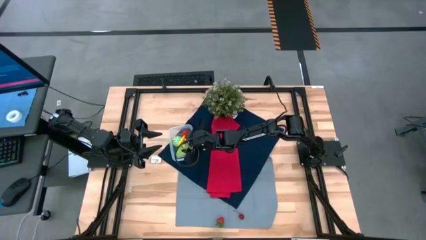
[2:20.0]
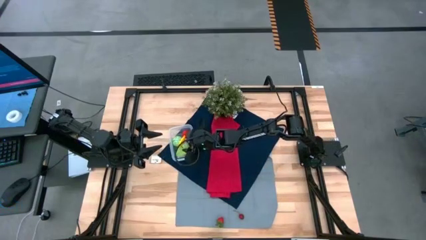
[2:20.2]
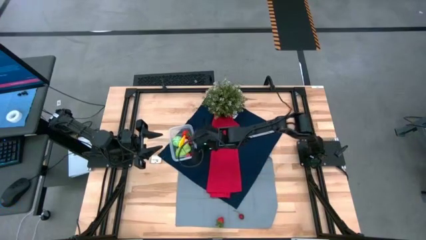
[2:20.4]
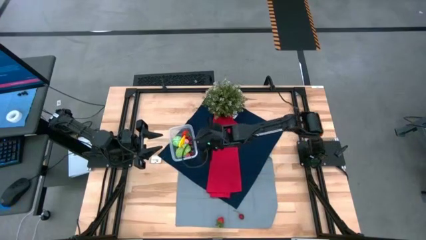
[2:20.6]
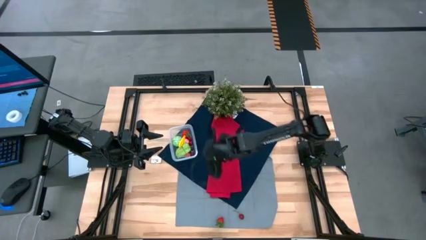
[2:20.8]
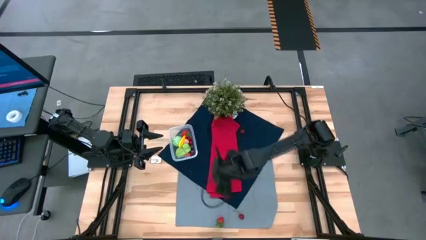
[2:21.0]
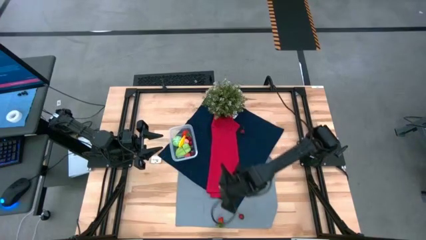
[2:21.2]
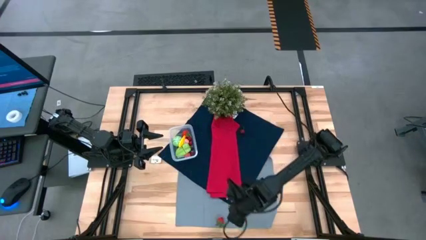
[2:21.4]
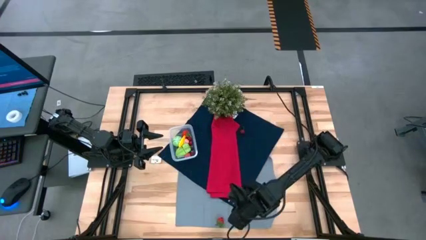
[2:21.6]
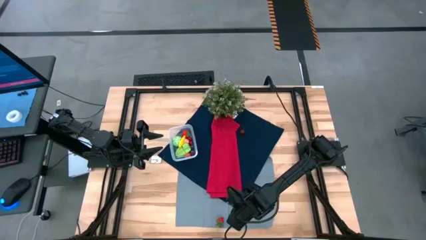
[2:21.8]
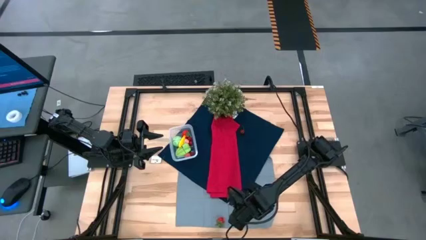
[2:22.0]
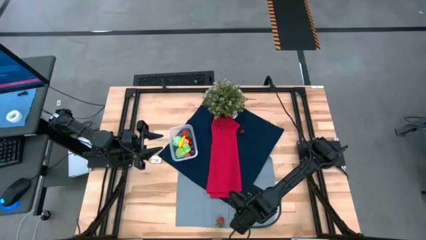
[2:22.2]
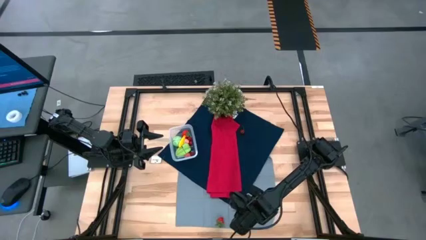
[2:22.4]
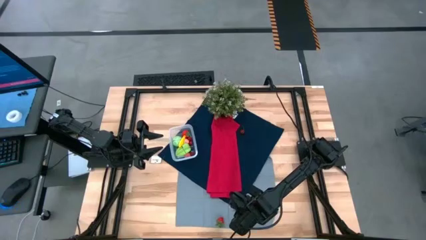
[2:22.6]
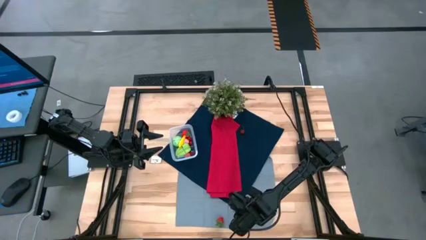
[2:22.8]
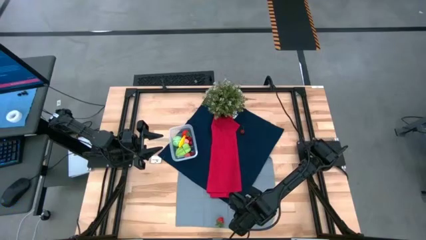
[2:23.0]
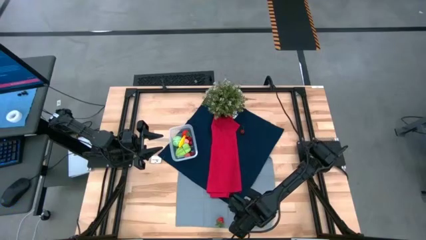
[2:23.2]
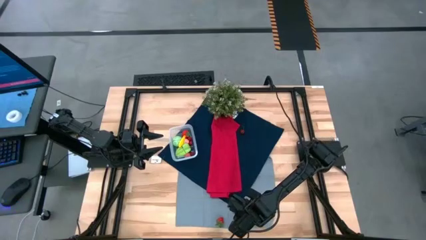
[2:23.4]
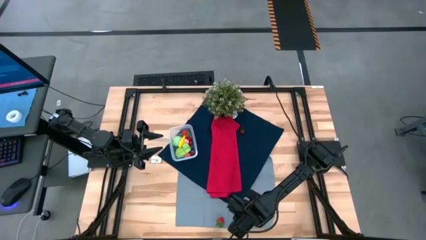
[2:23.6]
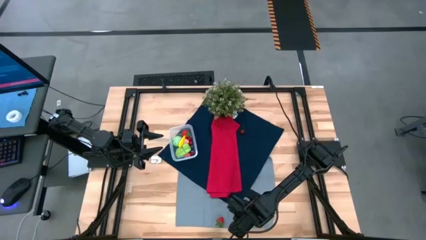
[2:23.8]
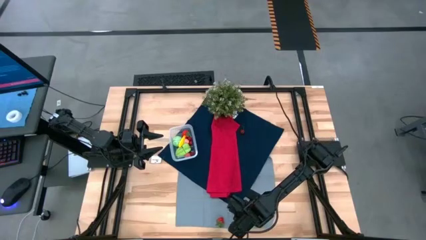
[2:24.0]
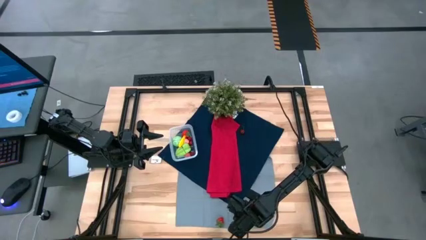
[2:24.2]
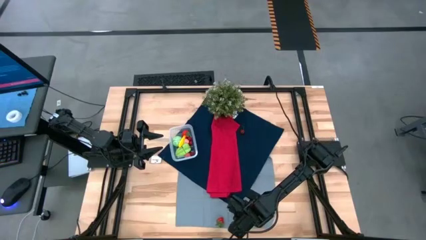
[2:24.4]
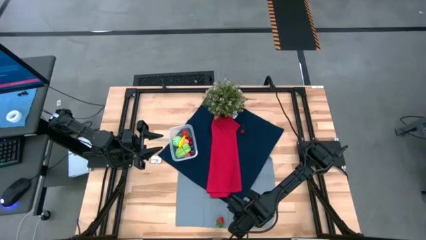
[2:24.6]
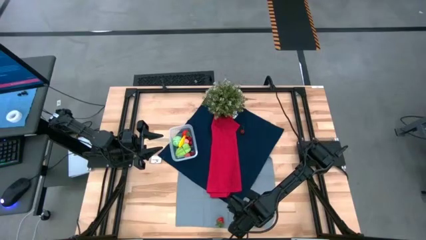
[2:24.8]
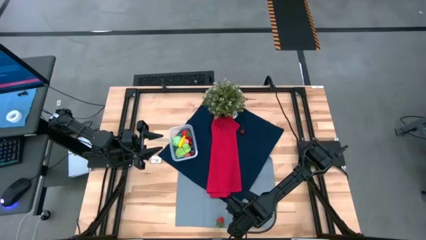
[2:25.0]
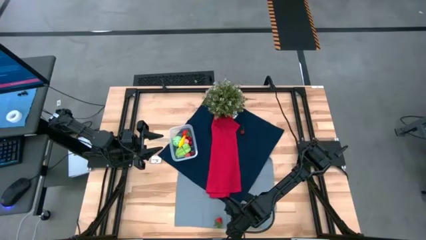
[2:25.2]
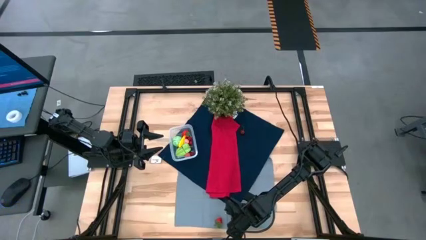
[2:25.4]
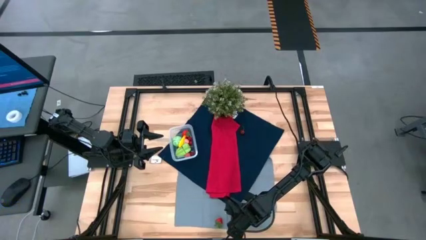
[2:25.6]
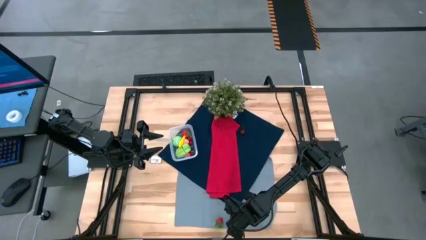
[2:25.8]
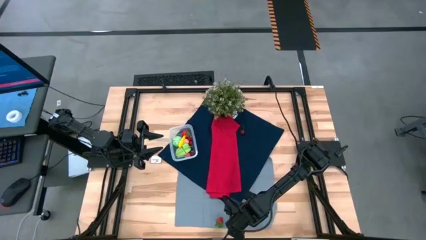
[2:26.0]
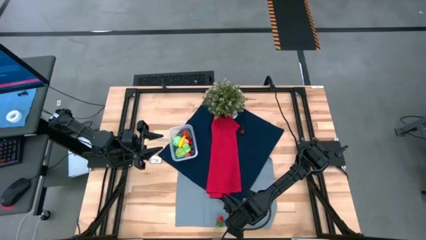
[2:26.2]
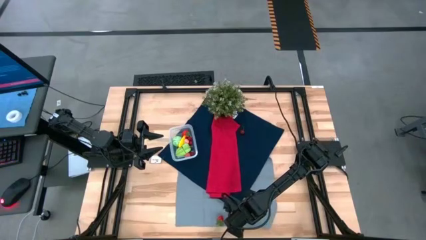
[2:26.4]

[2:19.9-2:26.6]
Task: Pick and placing Produce into tupperware
Put the bottom red cherry into the transparent bin

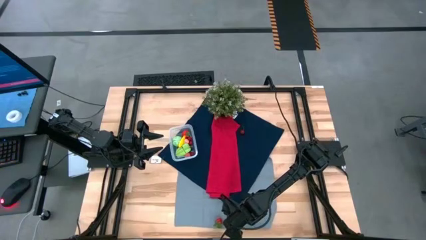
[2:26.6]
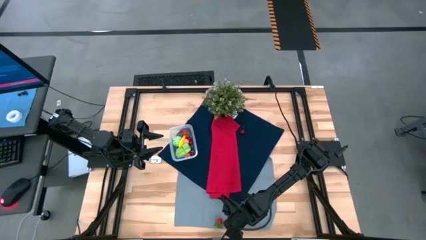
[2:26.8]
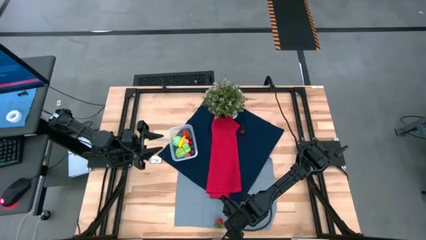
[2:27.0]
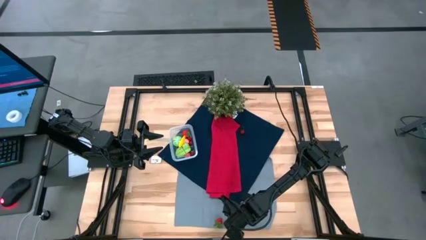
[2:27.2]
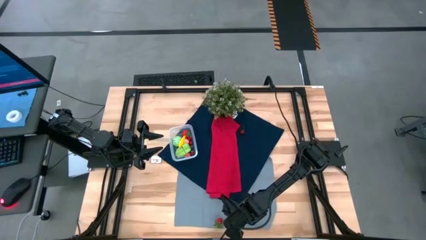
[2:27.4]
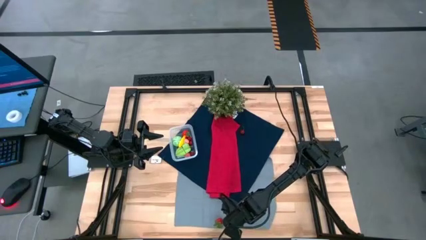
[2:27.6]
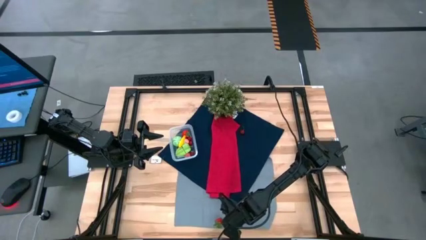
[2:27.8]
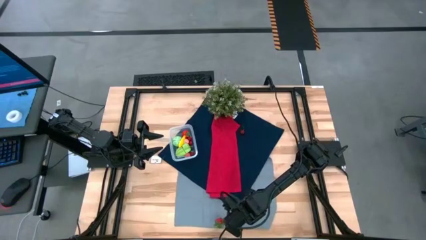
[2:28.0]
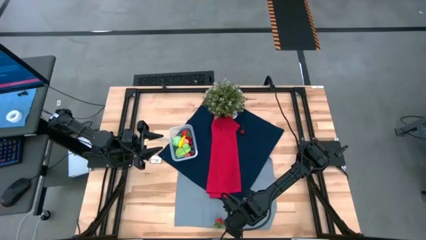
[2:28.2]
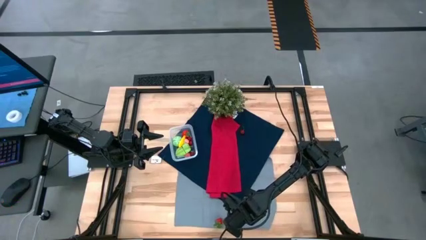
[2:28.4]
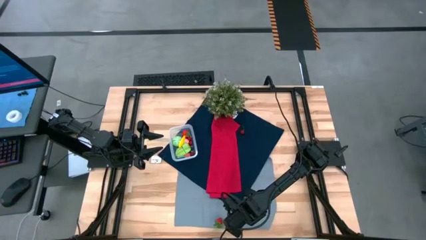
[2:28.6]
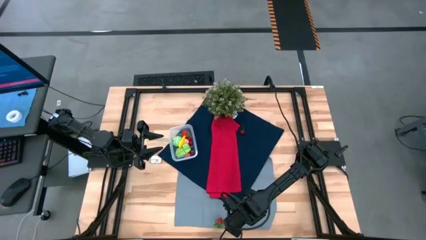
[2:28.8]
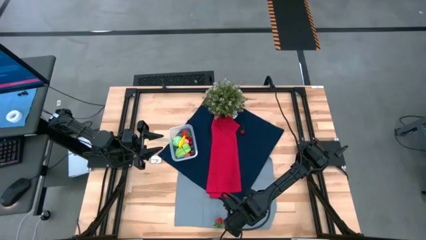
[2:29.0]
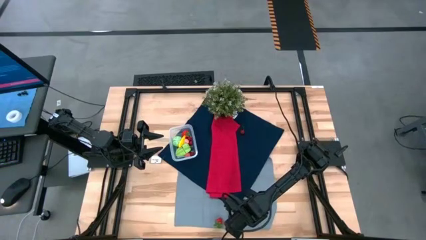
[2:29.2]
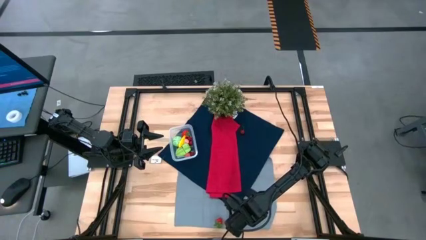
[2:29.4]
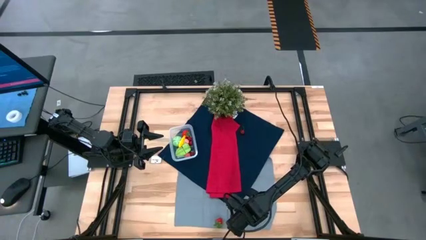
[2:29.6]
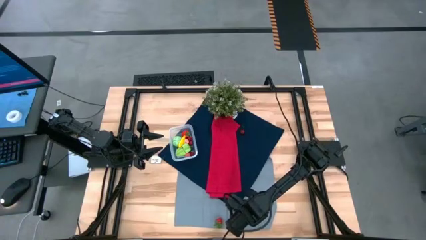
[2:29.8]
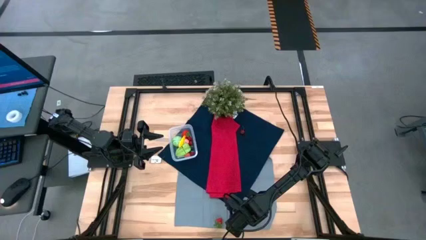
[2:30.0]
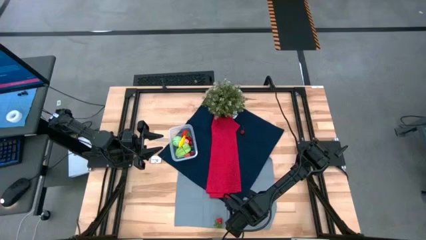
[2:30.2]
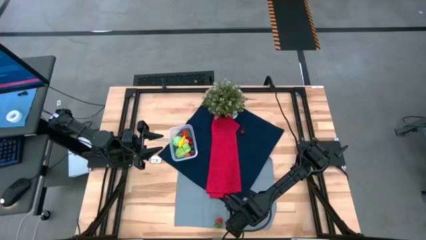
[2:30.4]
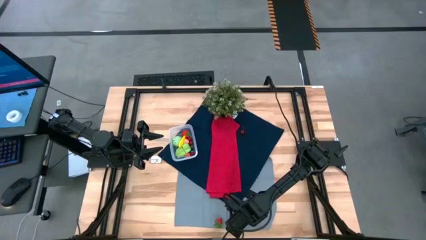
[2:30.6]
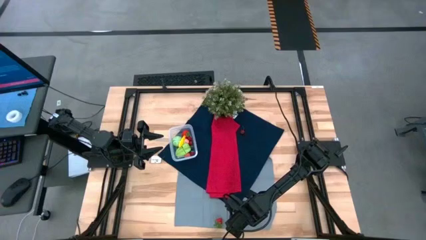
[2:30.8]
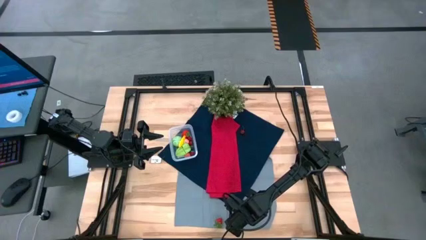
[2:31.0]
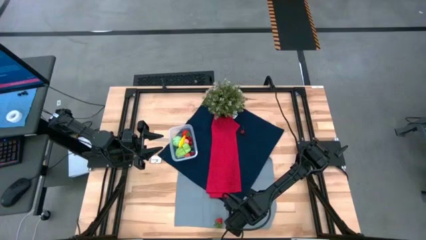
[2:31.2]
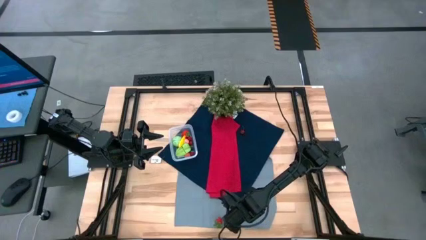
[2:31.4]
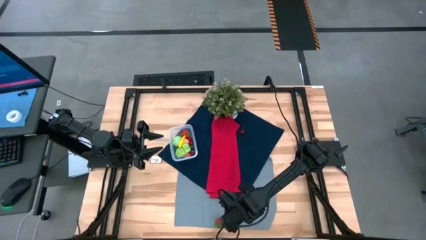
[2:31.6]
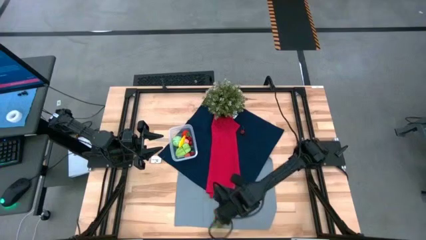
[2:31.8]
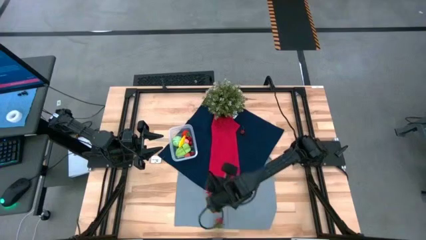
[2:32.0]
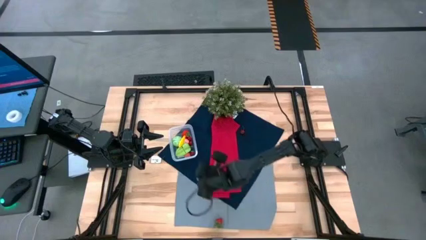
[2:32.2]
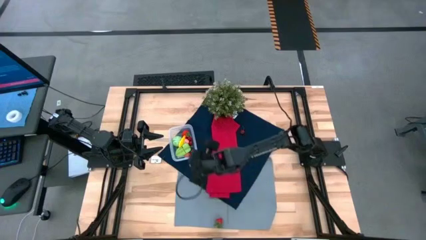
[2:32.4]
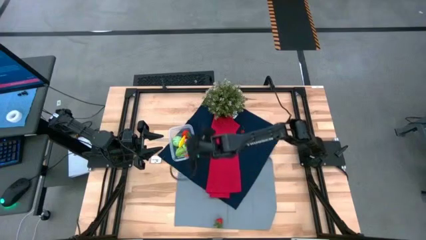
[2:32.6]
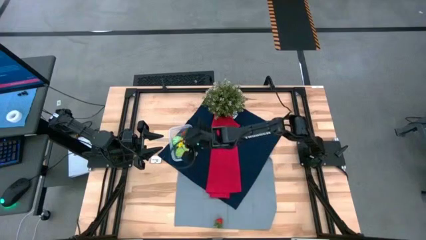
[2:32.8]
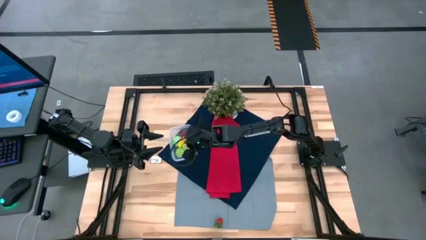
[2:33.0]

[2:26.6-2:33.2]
Put the bottom red cherry into the transparent bin
